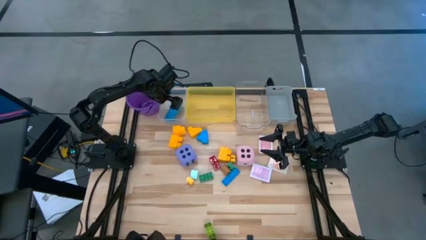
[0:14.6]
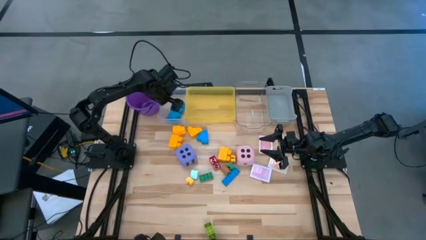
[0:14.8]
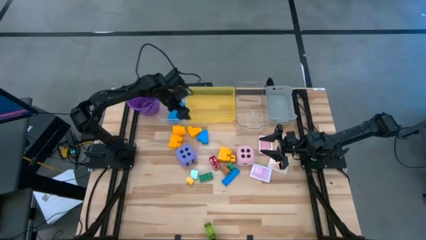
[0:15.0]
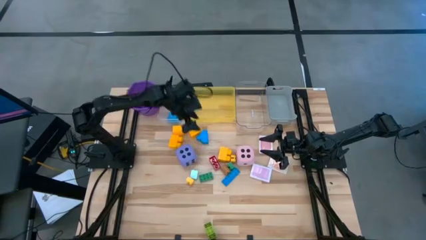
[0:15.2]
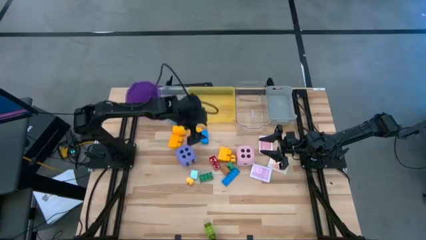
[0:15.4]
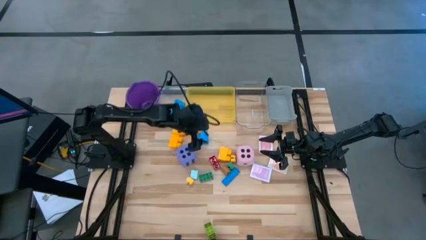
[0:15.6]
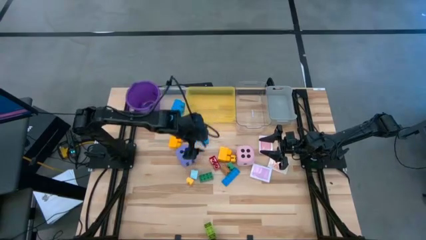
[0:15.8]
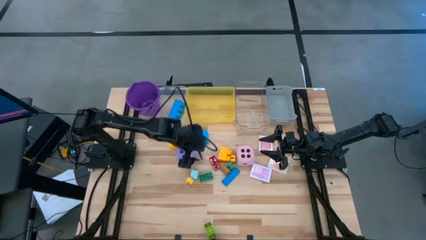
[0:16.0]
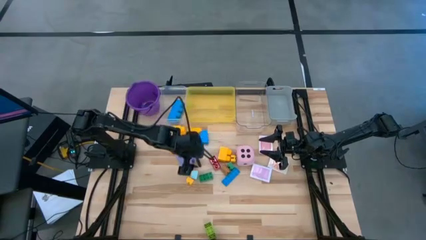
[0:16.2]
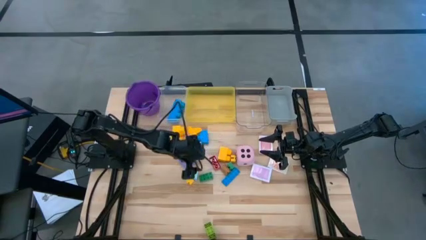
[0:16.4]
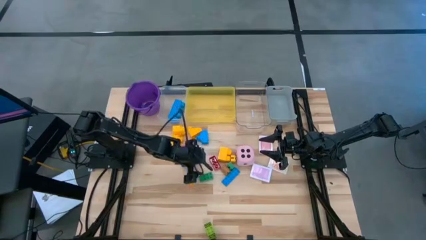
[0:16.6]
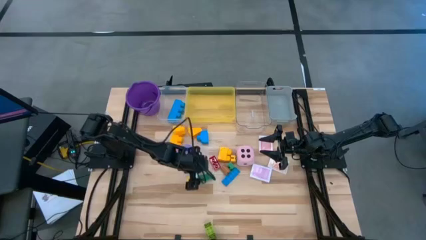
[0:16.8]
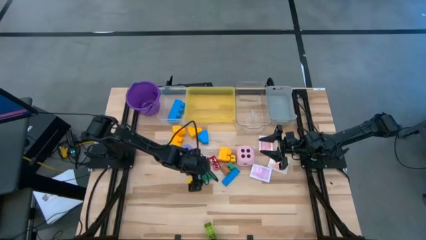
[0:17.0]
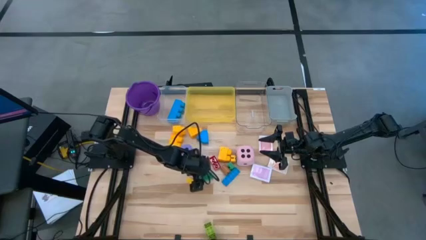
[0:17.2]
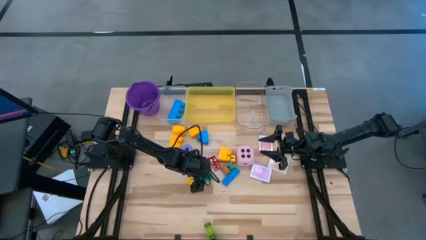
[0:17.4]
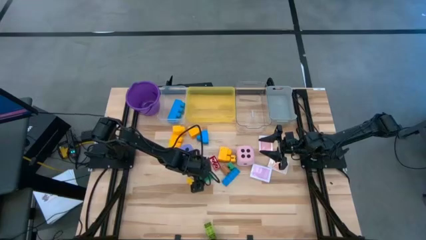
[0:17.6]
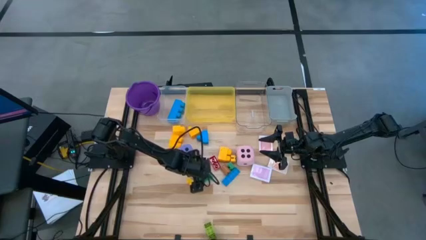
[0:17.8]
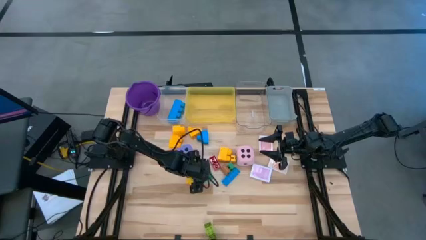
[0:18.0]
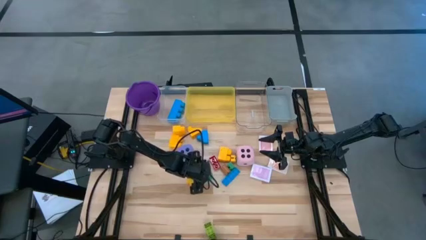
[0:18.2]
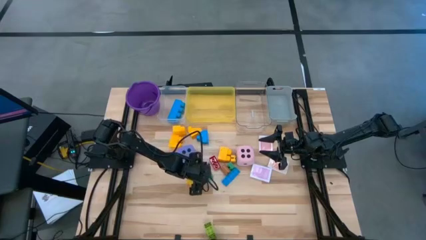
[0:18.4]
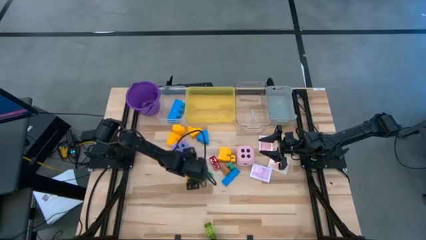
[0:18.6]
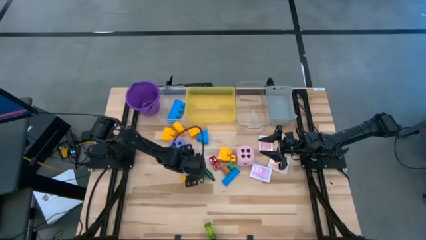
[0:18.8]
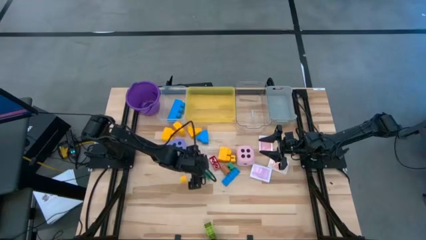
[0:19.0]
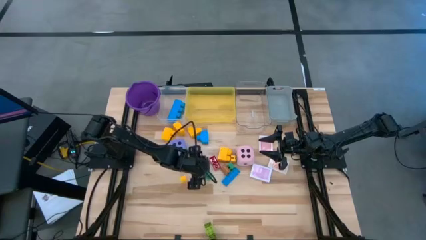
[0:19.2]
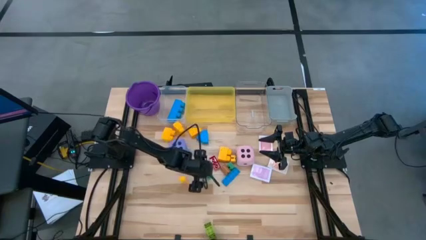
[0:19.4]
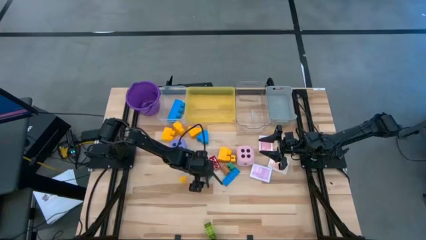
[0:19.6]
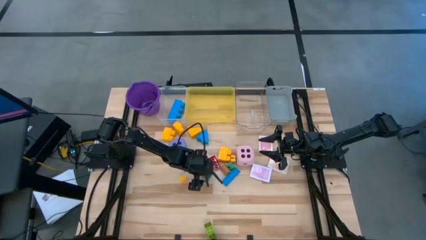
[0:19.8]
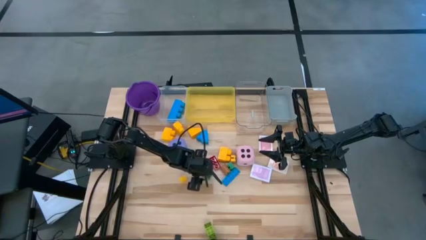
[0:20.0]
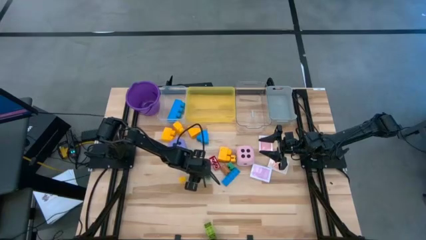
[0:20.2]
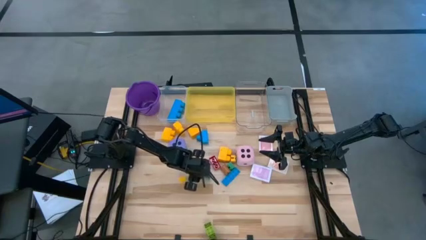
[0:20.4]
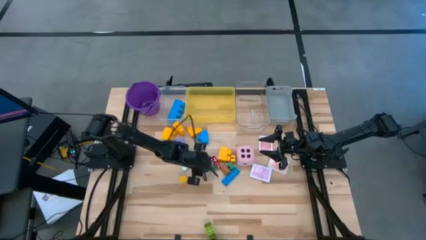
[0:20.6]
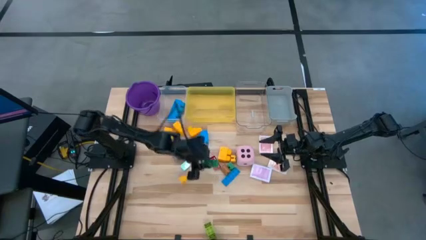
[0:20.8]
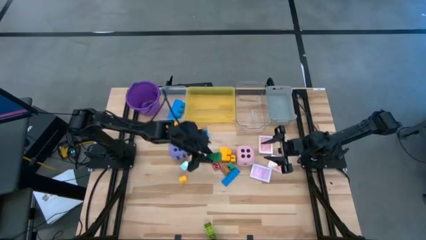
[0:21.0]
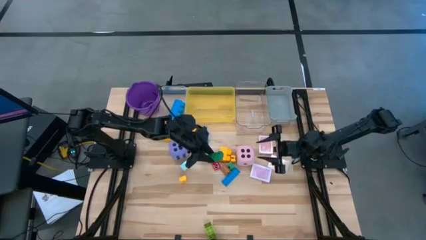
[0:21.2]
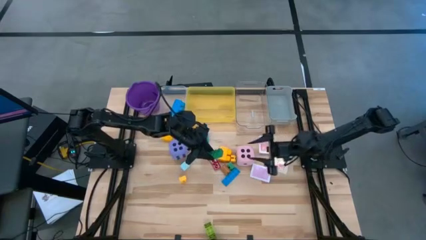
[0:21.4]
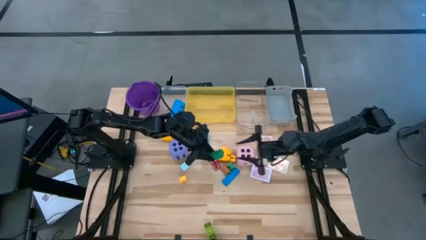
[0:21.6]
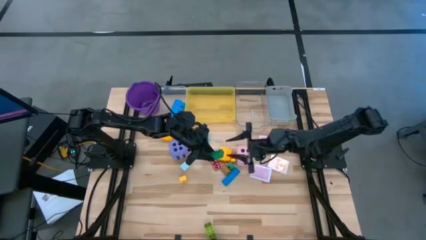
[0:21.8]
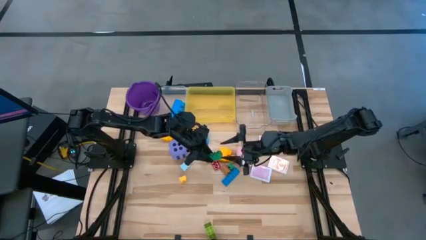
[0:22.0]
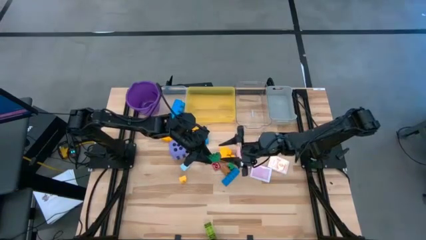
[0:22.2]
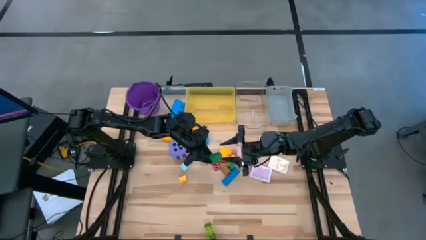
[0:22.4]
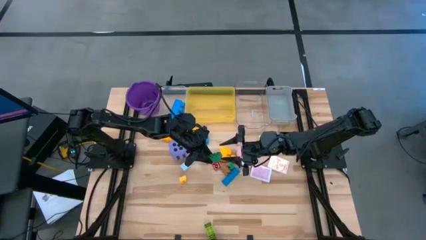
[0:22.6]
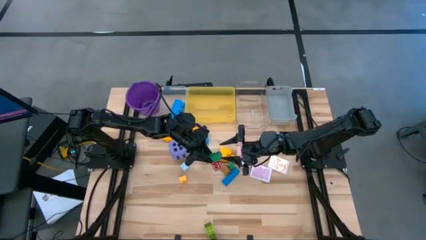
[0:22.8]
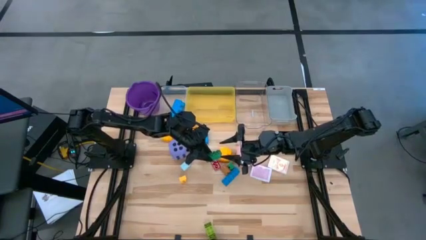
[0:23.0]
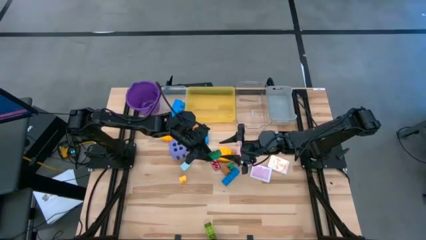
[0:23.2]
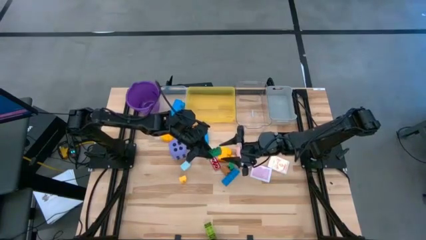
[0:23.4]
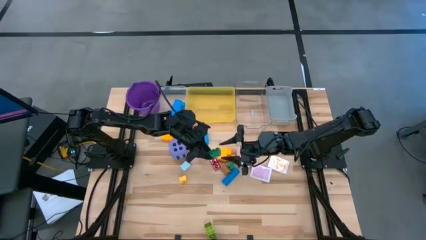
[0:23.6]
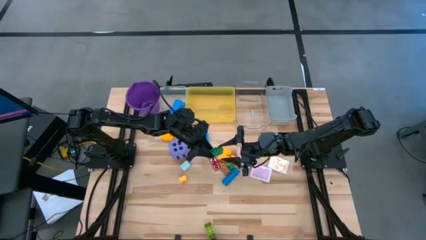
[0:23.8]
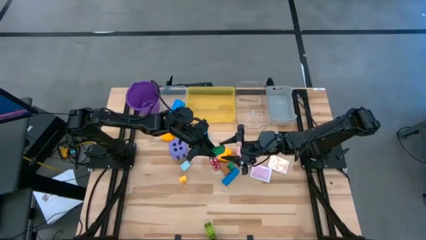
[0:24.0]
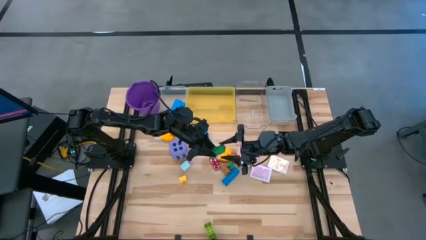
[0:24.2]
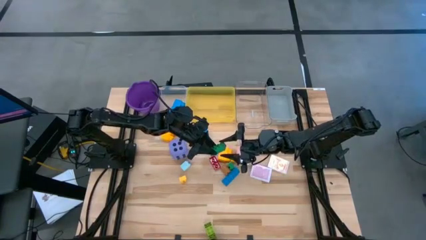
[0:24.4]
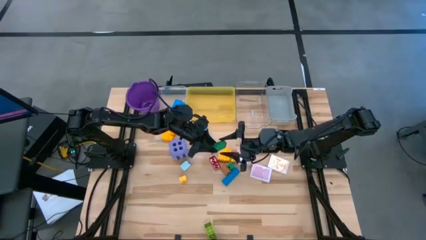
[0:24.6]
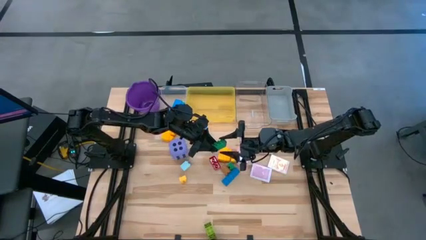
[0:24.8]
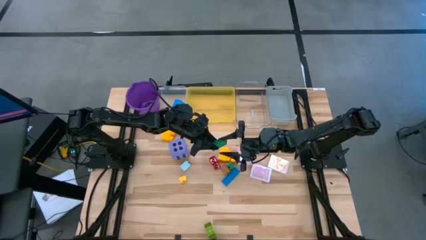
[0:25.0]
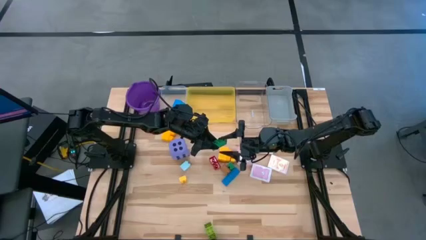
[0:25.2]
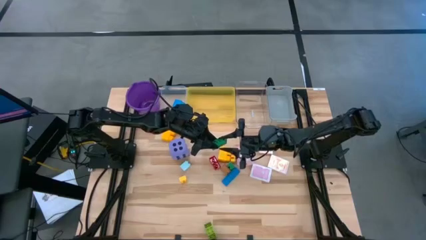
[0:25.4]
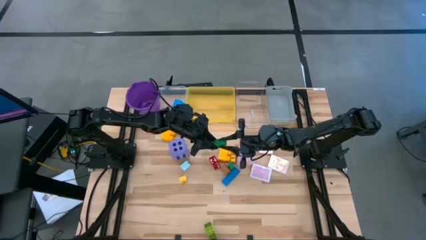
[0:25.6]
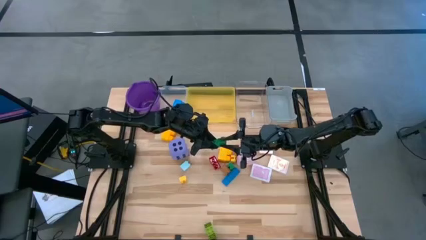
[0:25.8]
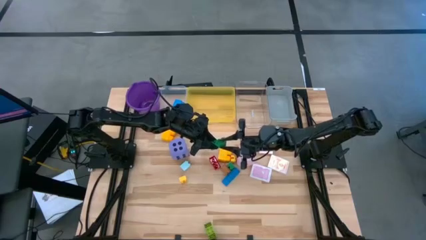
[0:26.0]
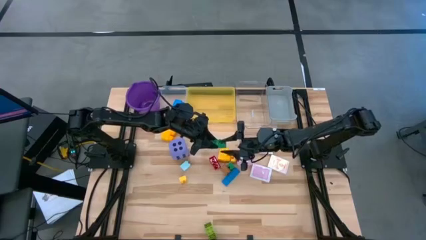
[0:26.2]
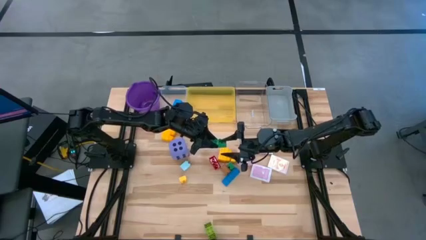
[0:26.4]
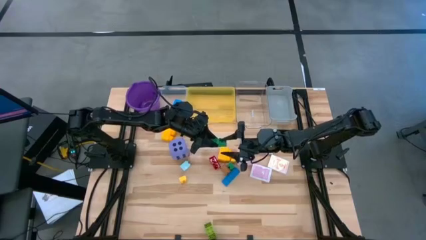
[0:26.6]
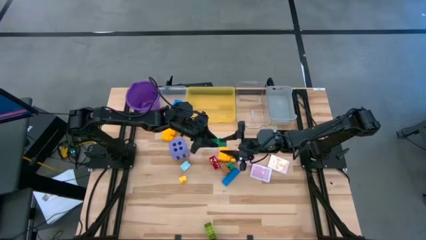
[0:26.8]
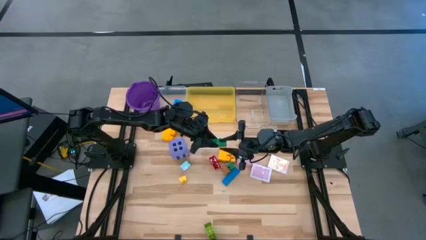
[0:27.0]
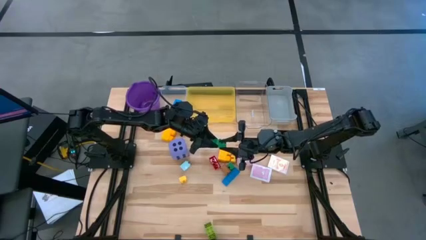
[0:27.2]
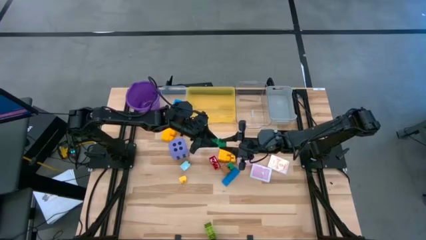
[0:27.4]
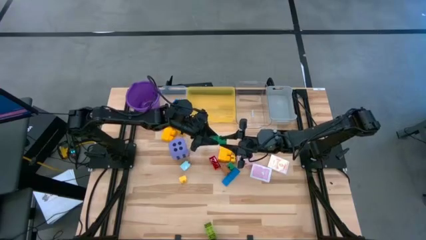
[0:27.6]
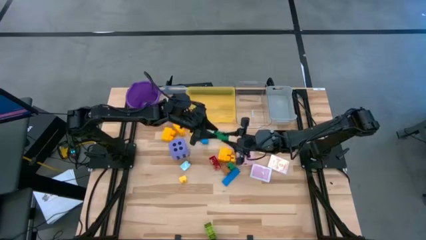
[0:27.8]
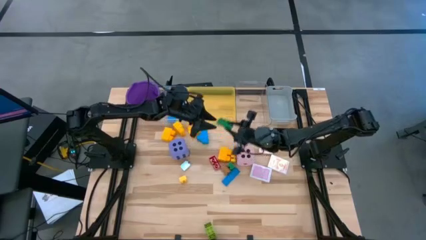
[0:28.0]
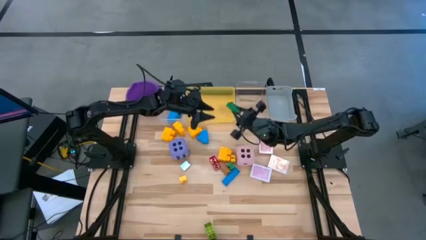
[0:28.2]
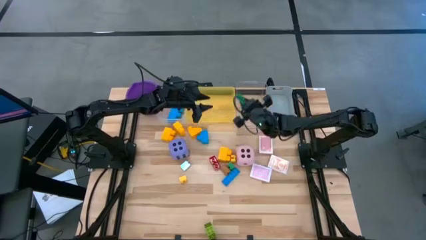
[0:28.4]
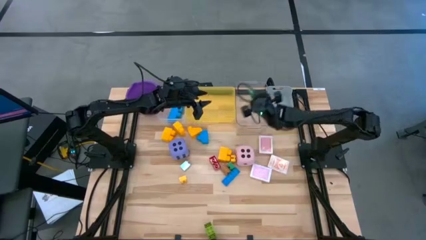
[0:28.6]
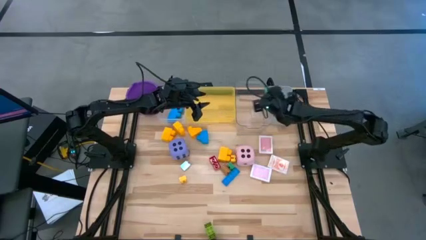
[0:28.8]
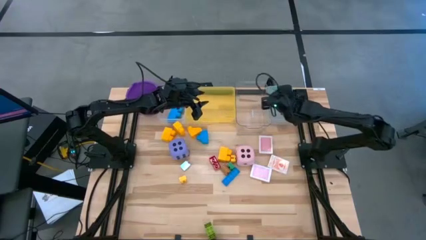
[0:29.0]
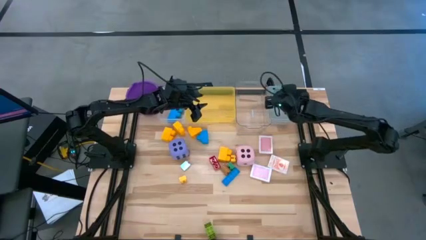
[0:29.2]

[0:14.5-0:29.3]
Task: Pick & Place Toys
Put the small green game piece into the gray bin
